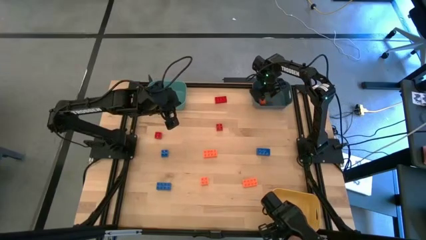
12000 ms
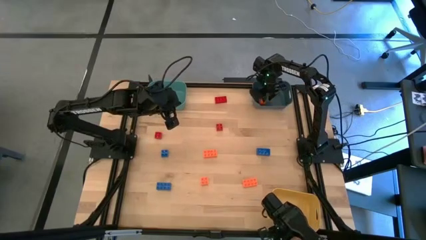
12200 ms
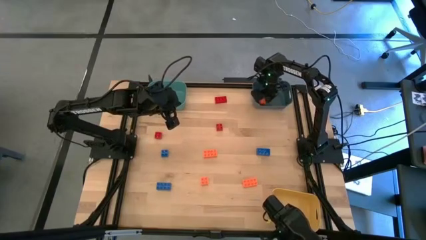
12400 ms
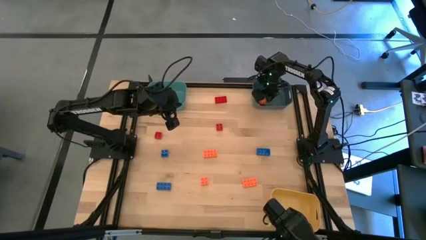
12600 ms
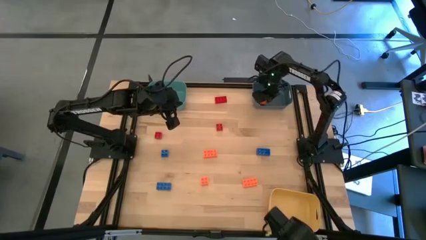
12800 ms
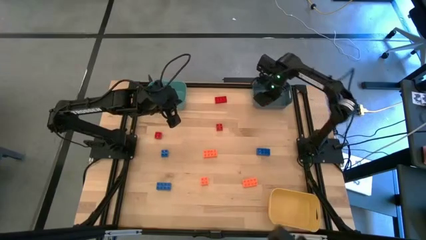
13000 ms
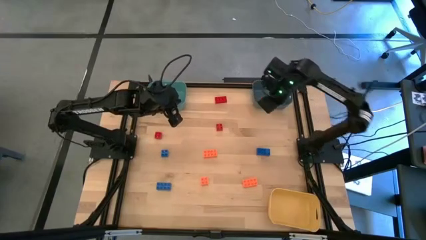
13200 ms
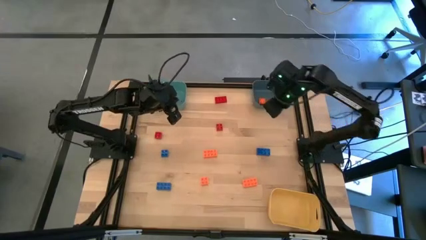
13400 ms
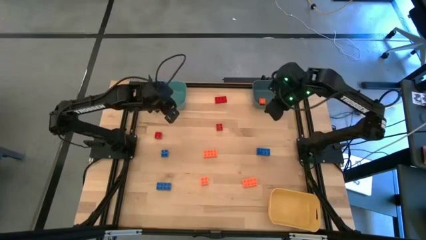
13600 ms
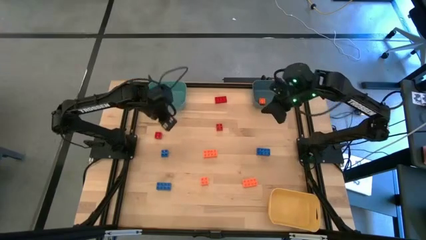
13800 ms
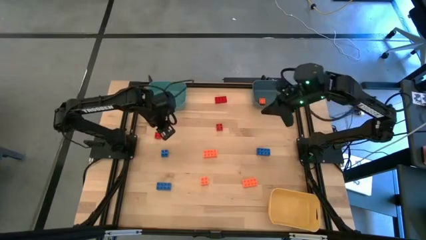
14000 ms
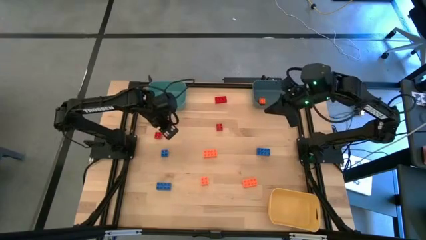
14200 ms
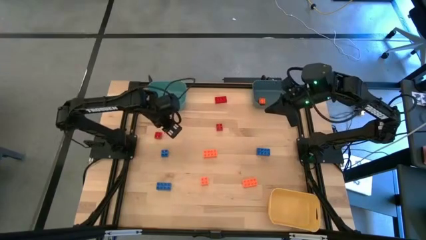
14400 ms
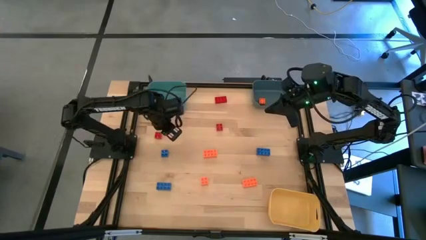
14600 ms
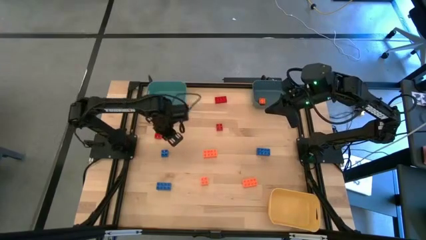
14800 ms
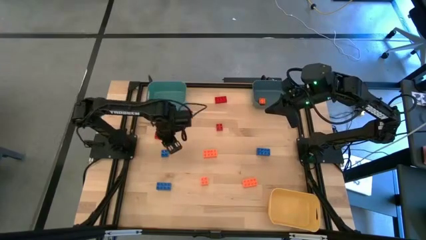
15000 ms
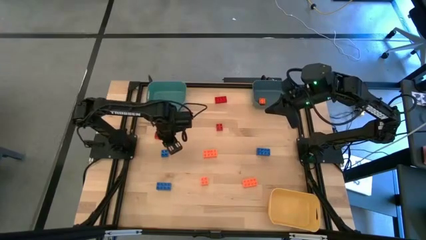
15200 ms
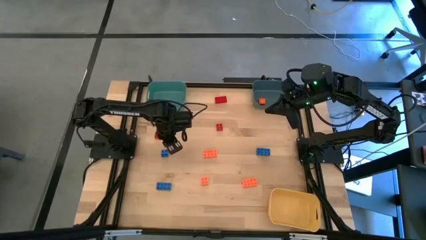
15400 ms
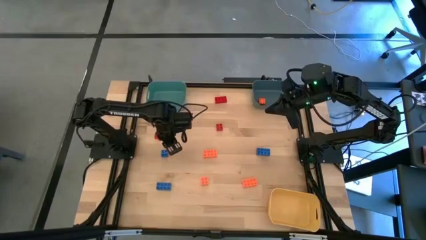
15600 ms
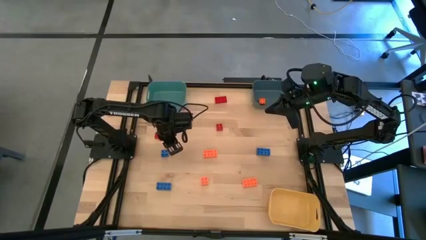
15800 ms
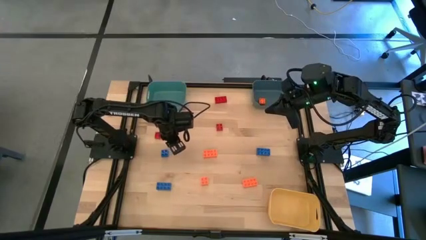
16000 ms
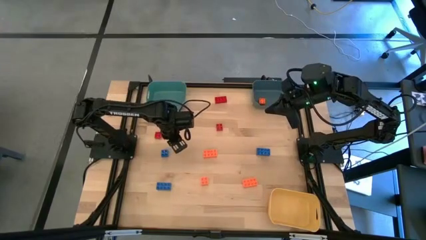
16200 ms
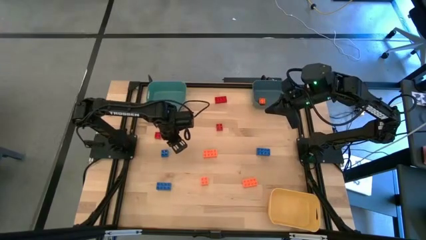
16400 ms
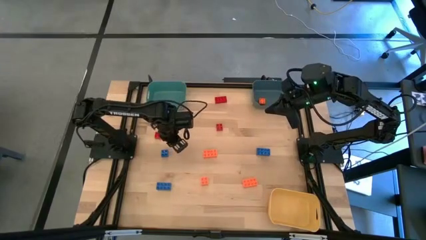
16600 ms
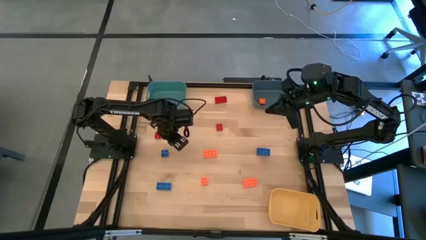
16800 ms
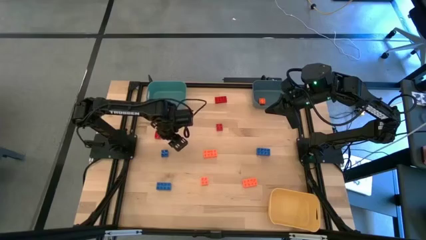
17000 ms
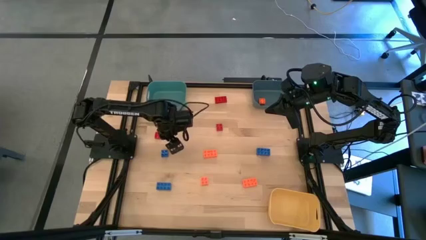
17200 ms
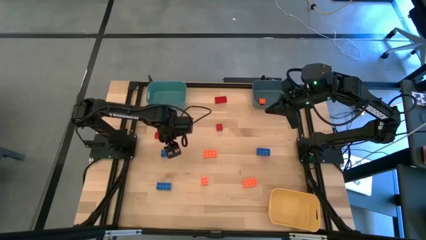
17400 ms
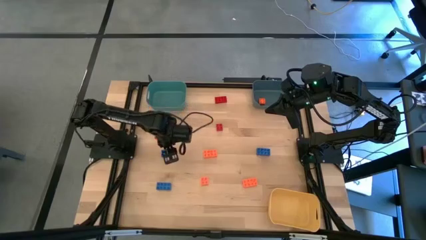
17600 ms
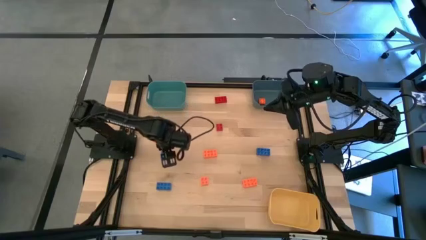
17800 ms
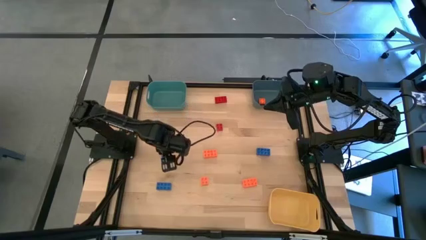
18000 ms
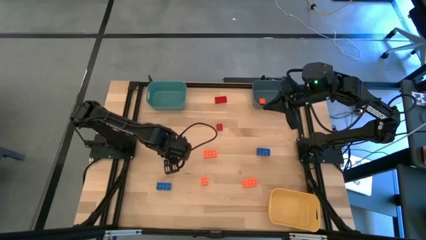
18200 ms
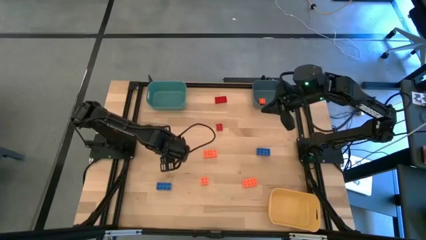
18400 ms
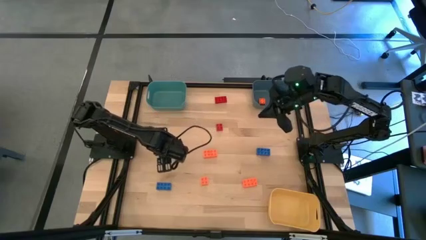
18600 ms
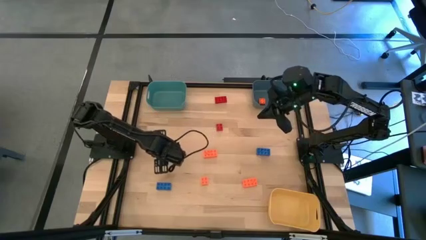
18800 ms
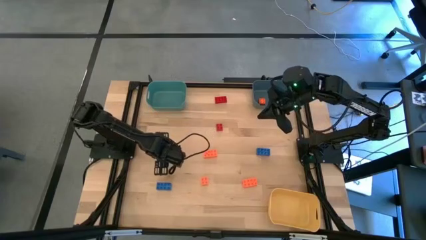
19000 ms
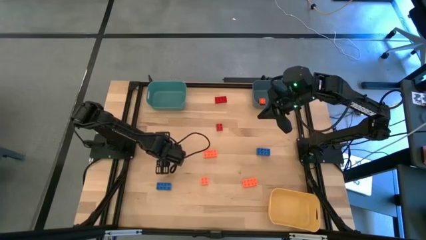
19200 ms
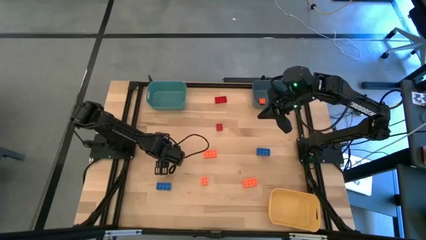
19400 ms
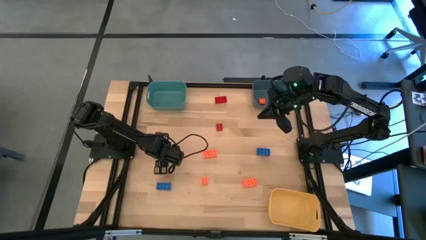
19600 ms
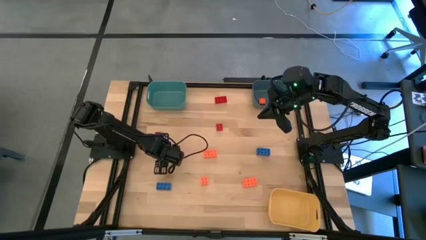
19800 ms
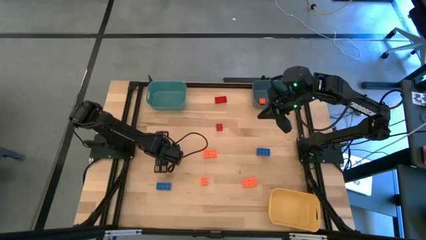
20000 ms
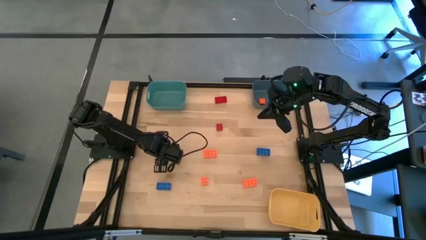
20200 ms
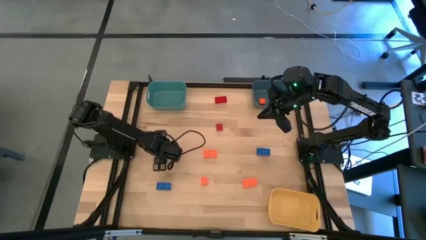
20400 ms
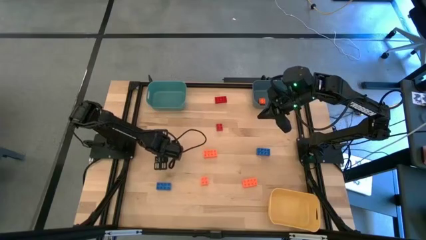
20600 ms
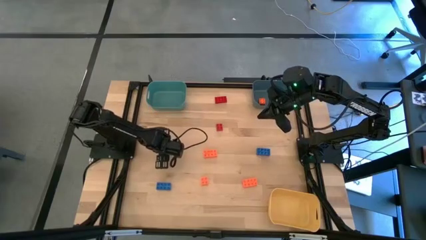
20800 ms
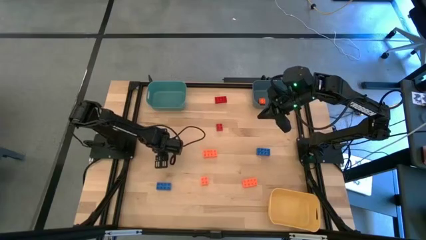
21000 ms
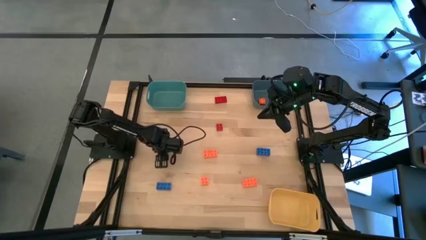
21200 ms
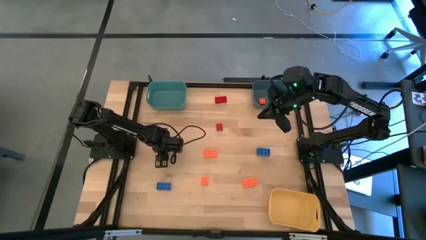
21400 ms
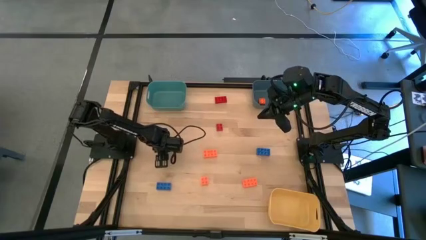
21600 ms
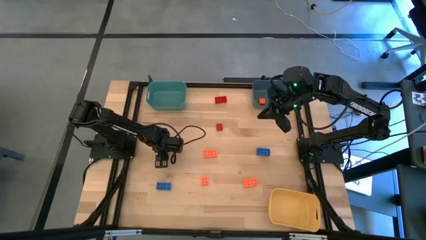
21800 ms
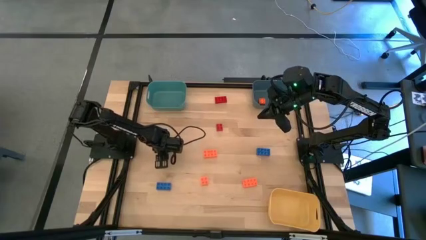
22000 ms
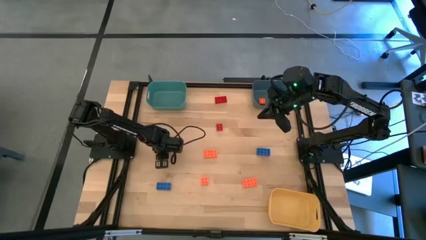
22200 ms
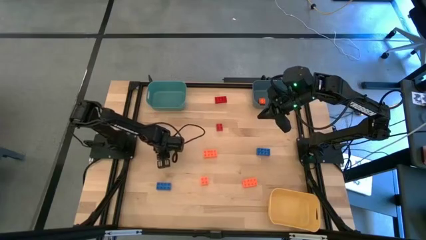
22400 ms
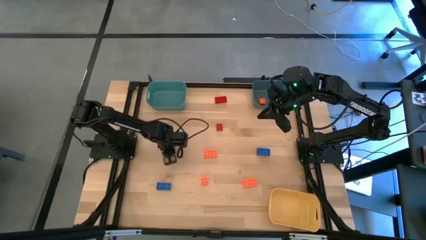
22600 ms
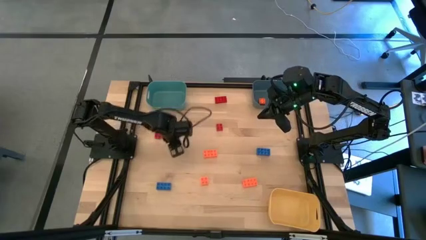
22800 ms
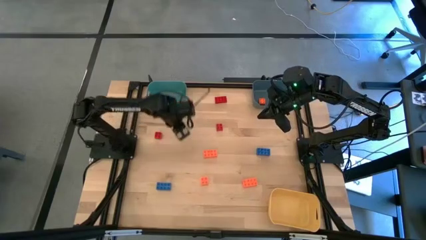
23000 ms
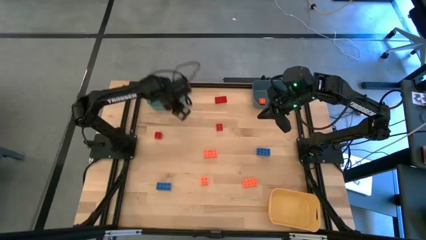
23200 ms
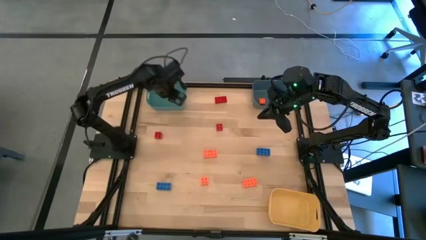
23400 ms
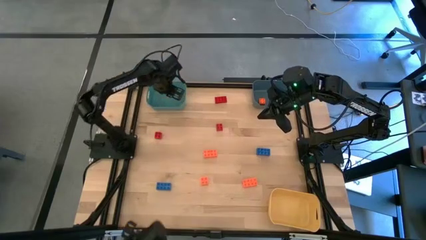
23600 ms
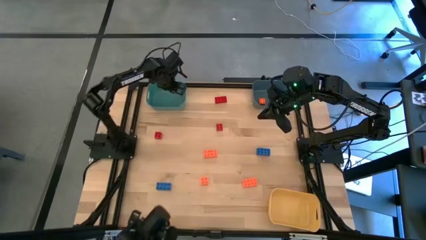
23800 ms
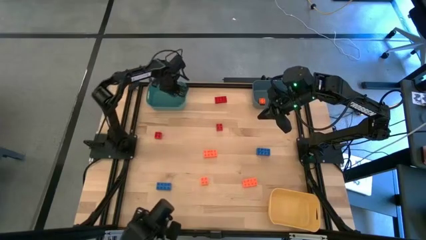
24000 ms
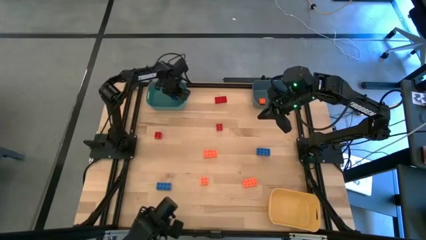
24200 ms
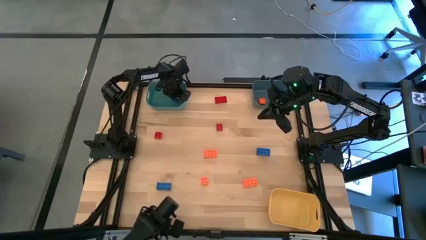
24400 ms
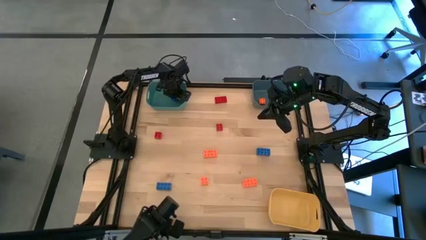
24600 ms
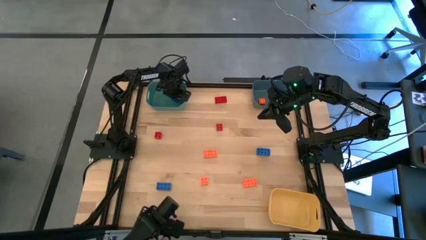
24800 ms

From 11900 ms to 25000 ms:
Task: Sort & place blocks by color
Put the blue game piece into the green bin

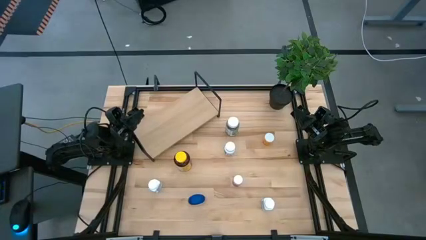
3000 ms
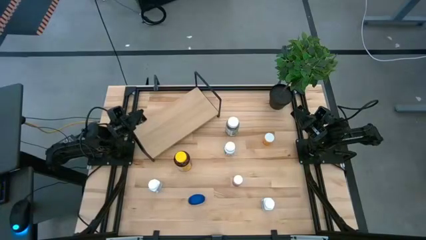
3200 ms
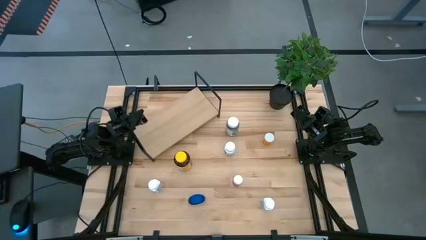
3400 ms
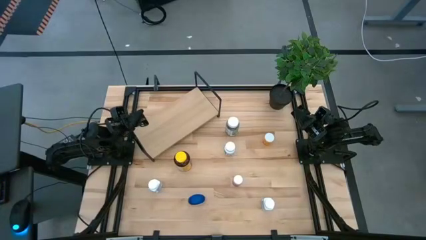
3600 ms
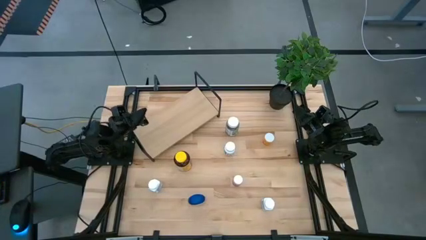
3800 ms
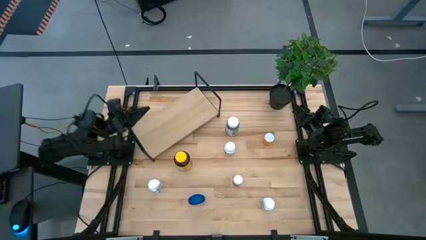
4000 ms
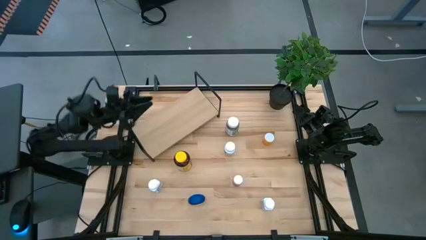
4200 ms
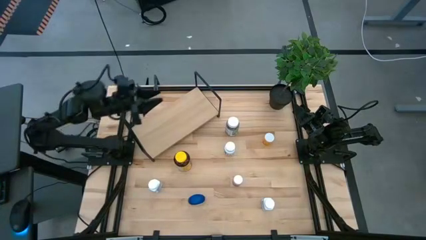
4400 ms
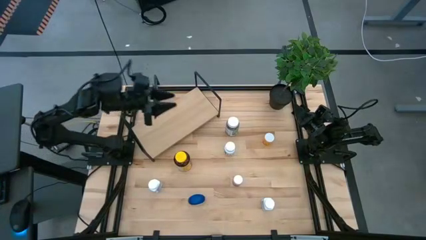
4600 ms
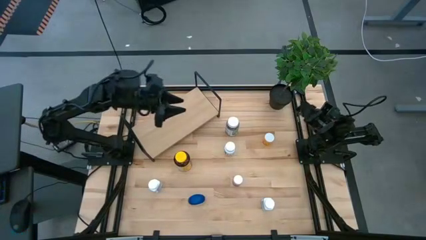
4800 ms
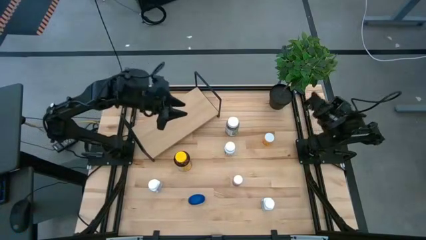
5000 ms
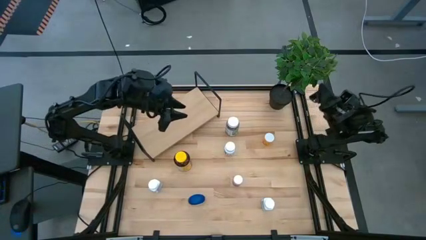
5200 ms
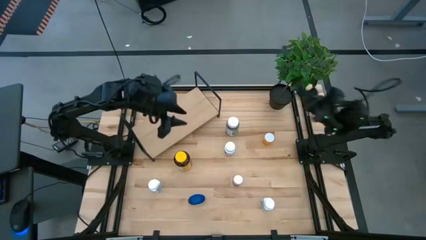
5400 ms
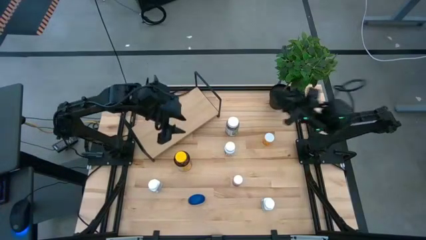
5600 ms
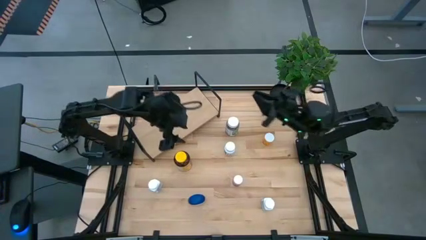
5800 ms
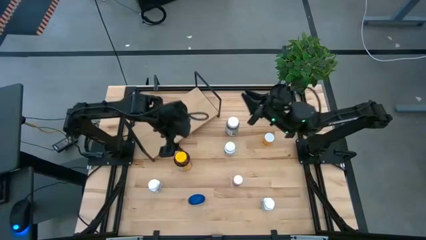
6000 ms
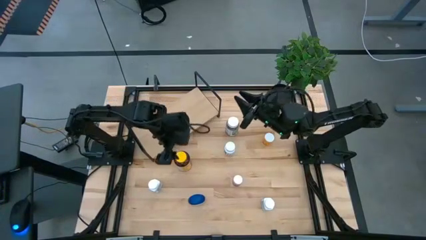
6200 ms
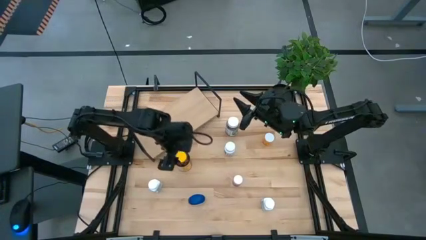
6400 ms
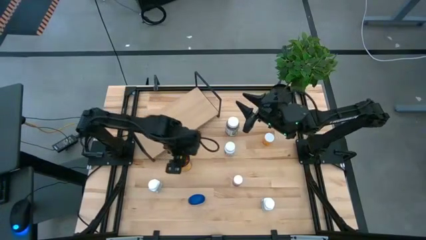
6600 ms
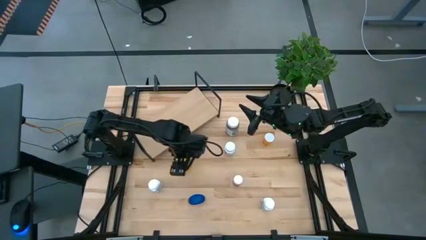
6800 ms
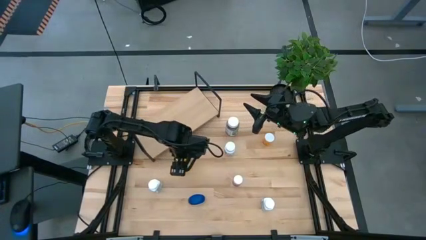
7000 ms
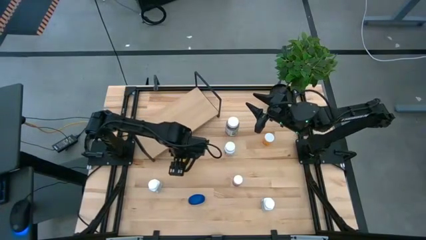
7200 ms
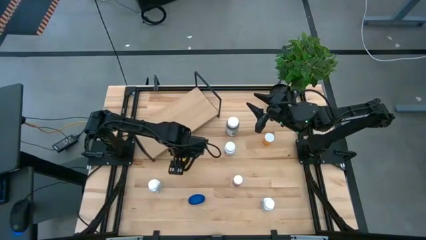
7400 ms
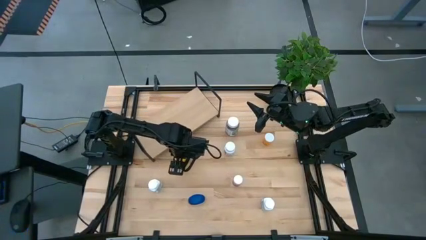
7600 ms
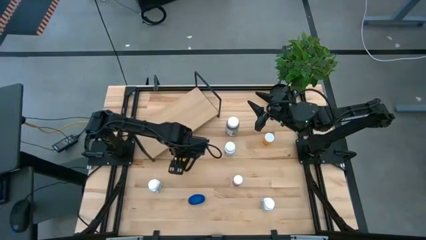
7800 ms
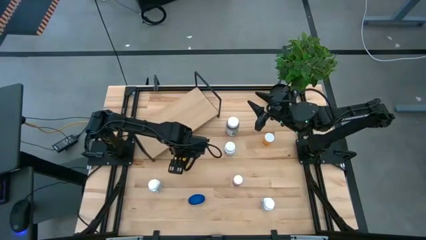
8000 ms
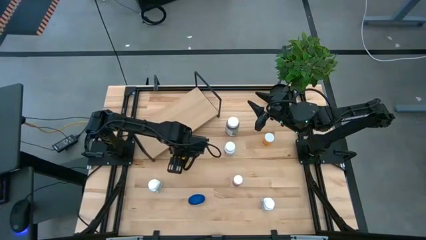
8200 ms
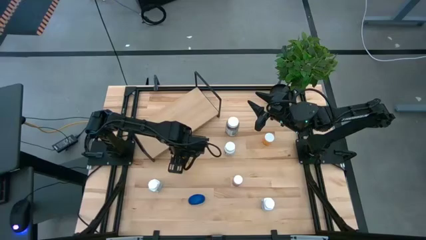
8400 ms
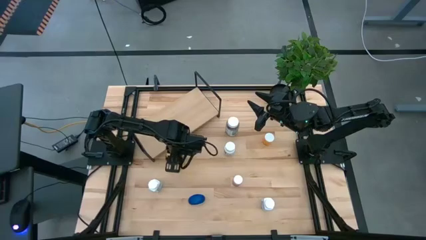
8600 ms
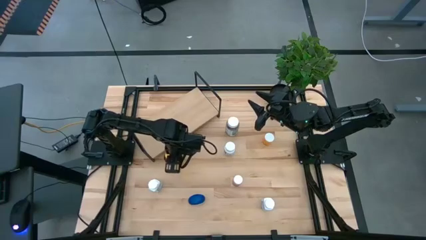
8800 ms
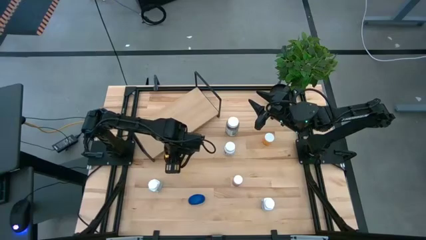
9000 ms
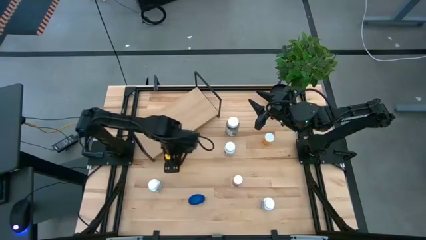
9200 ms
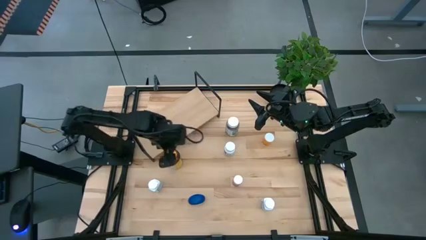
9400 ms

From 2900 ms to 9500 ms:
Task: Pick and place medicine bottles onto shelf by color
Put the yellow supplement bottle on the shelf
